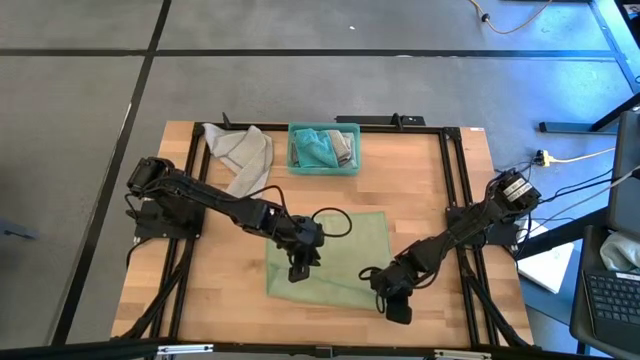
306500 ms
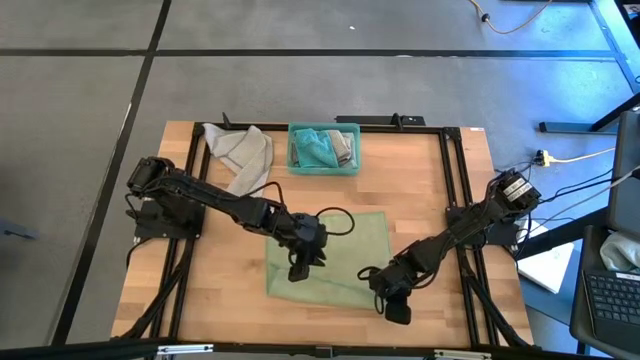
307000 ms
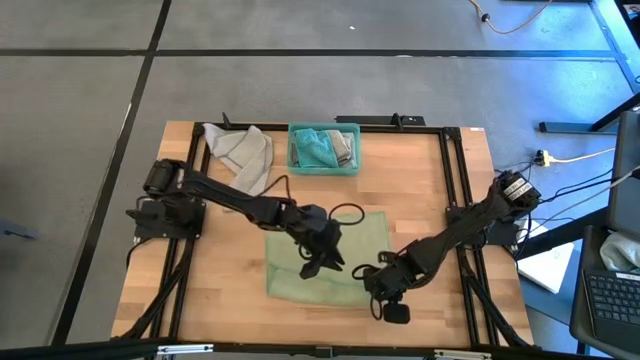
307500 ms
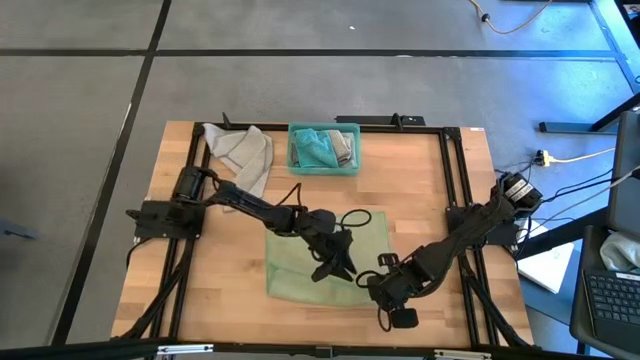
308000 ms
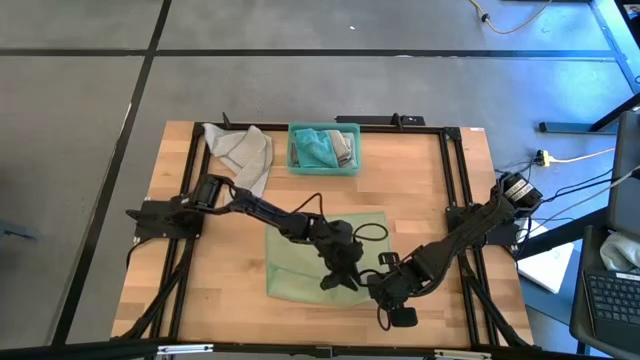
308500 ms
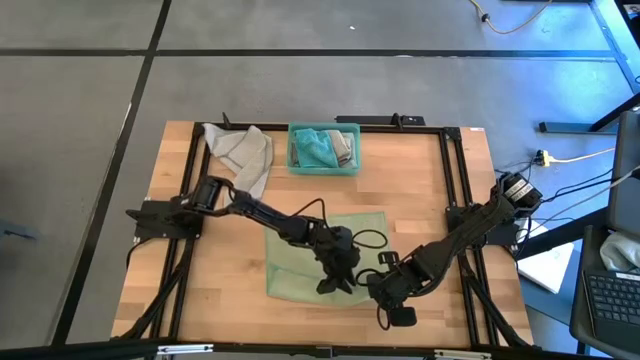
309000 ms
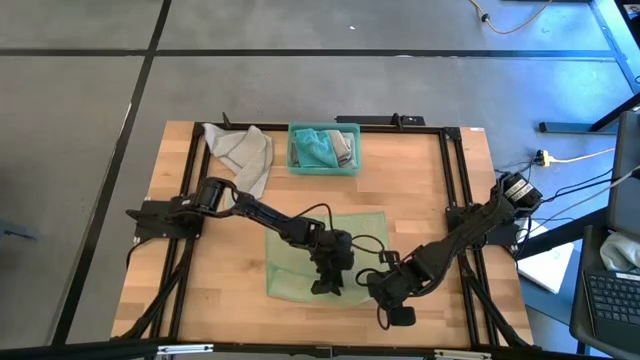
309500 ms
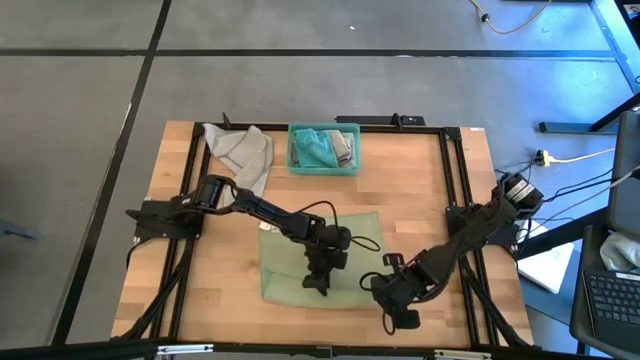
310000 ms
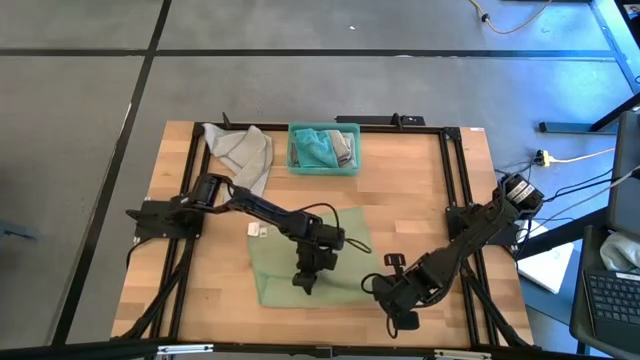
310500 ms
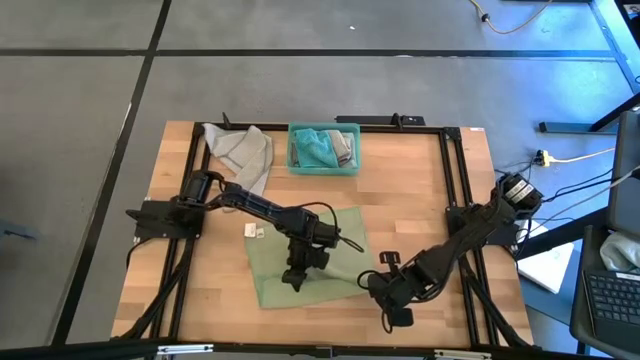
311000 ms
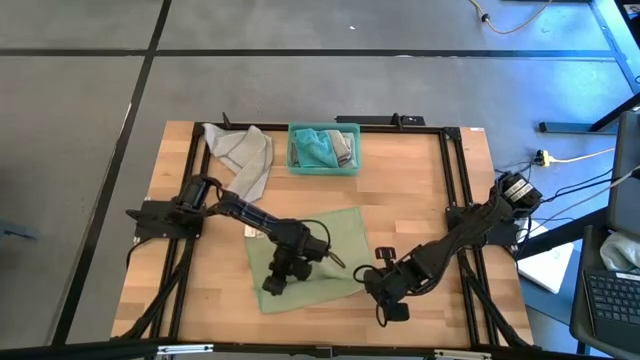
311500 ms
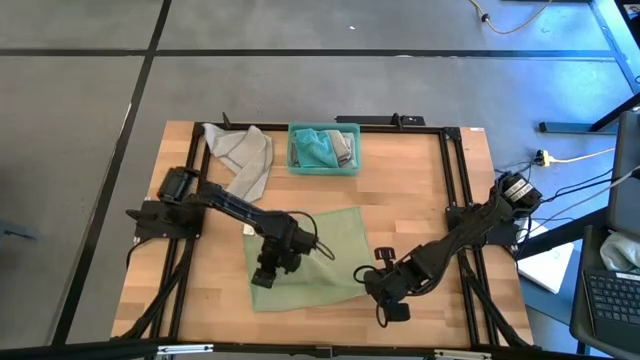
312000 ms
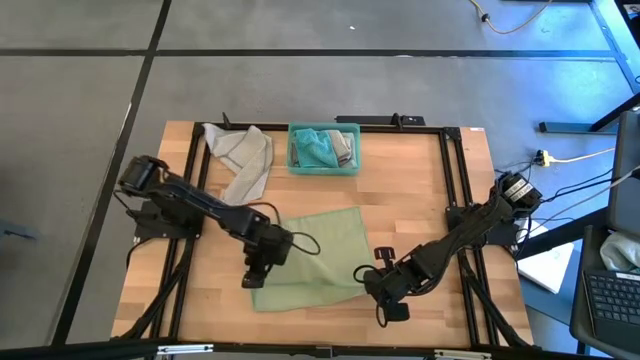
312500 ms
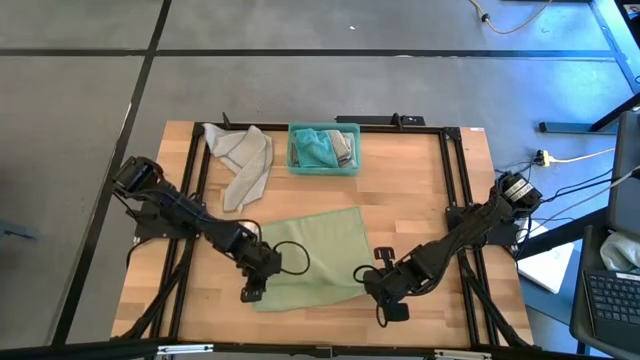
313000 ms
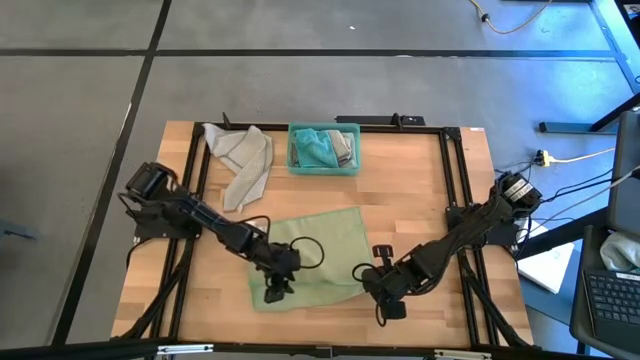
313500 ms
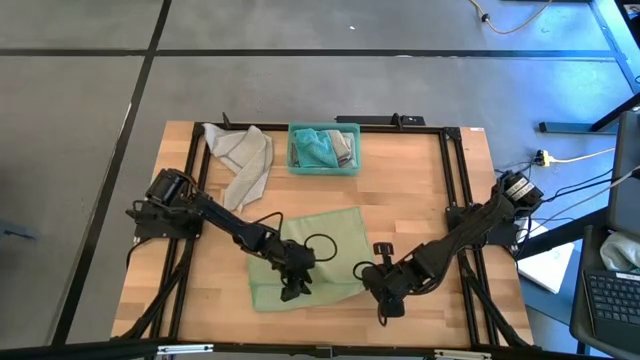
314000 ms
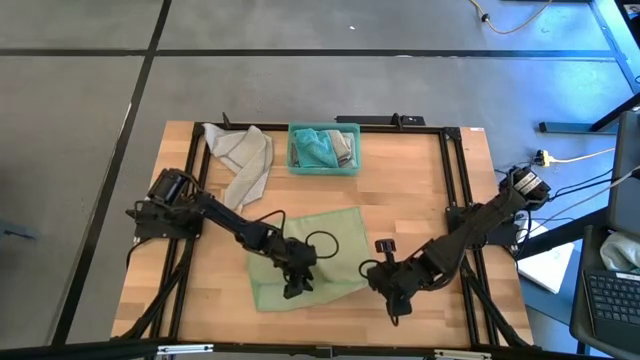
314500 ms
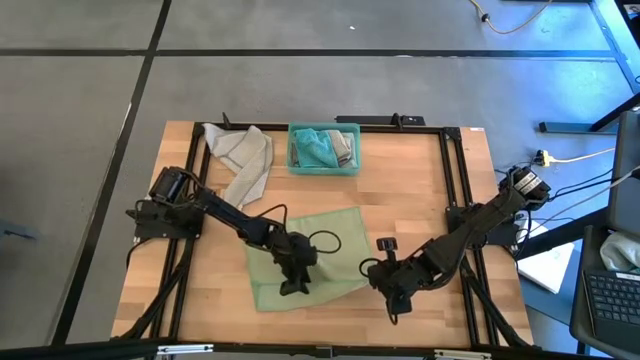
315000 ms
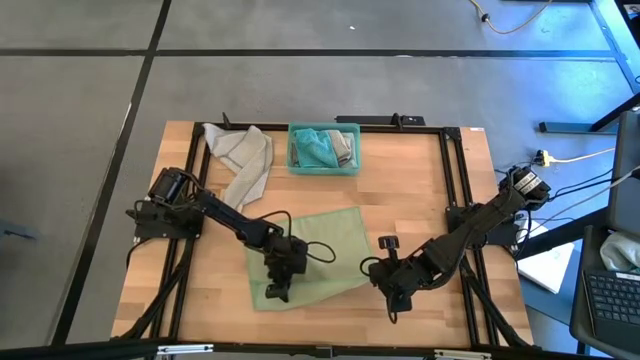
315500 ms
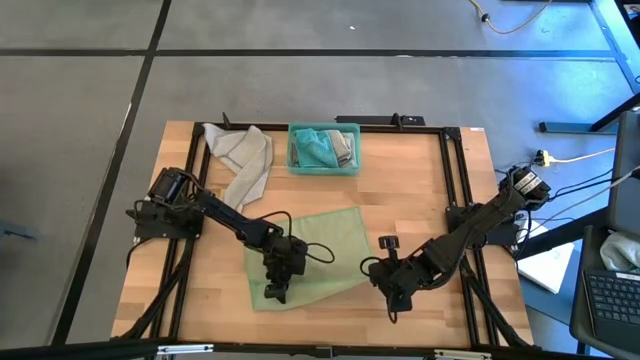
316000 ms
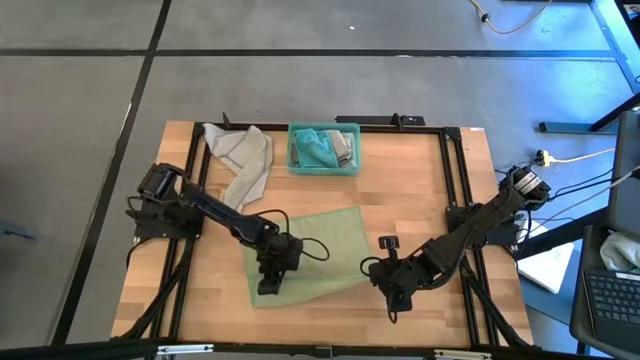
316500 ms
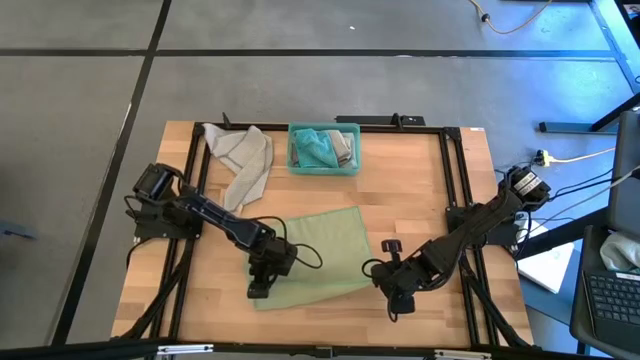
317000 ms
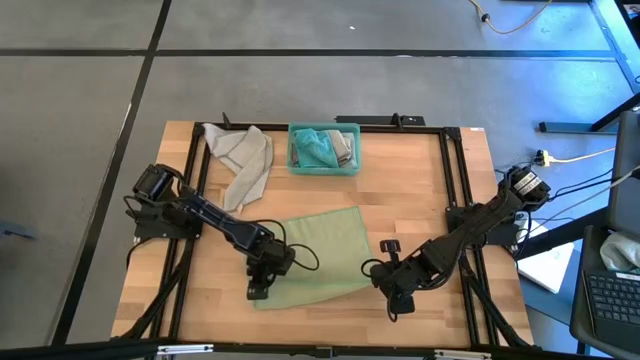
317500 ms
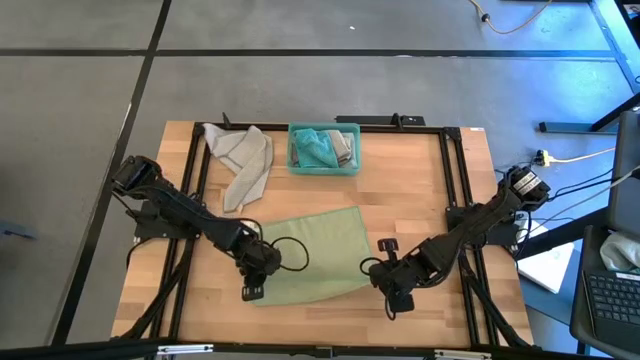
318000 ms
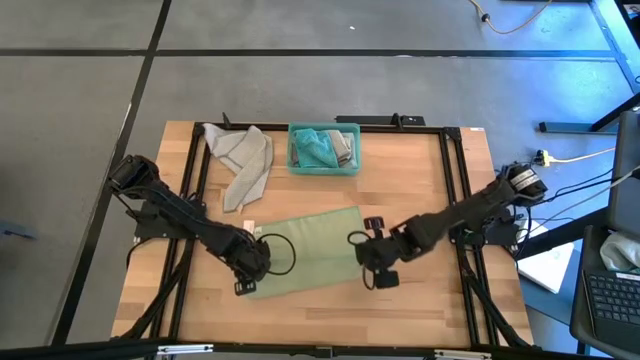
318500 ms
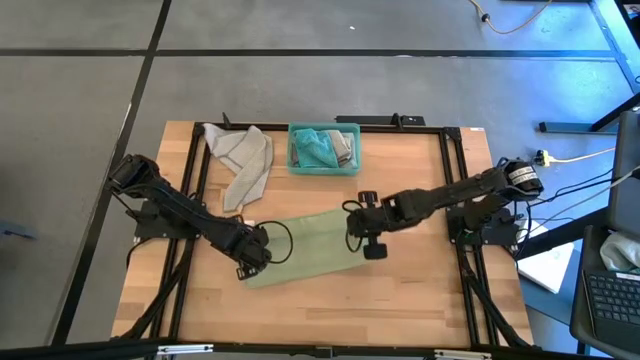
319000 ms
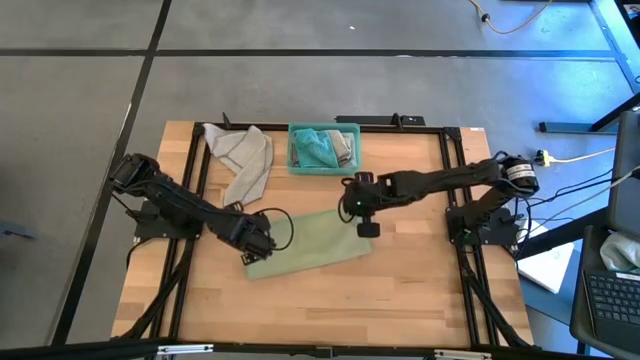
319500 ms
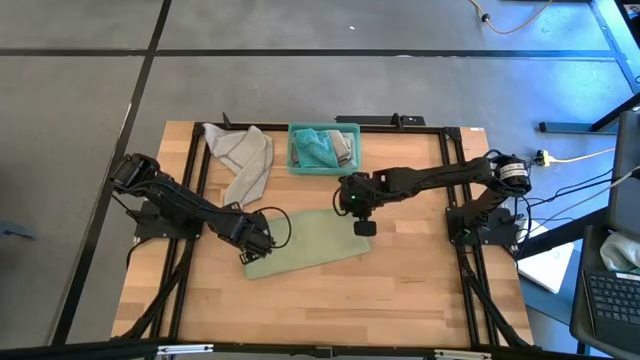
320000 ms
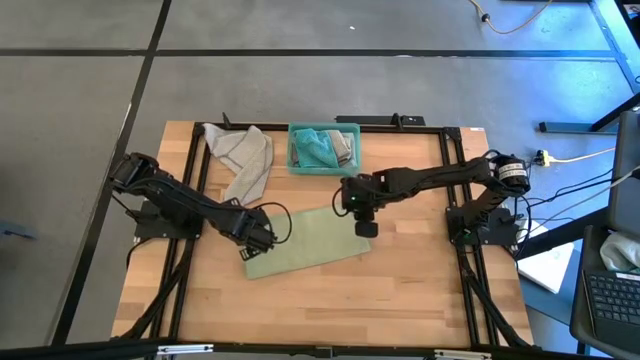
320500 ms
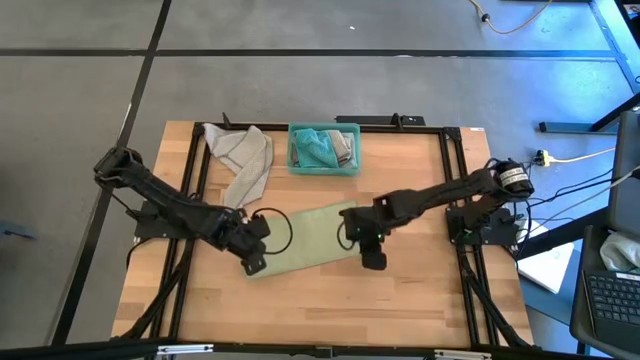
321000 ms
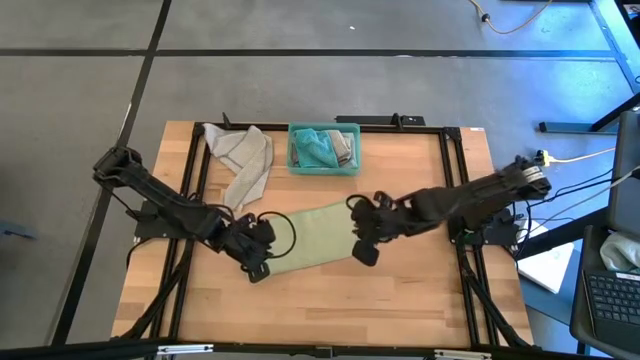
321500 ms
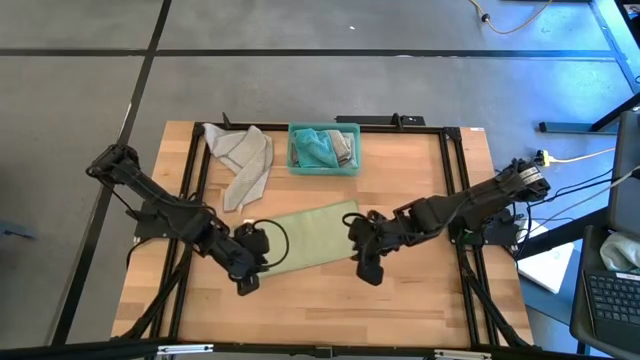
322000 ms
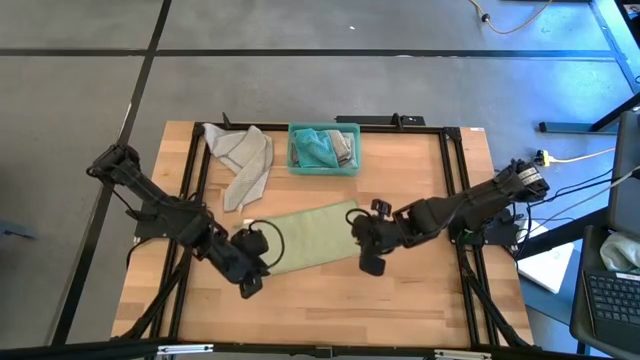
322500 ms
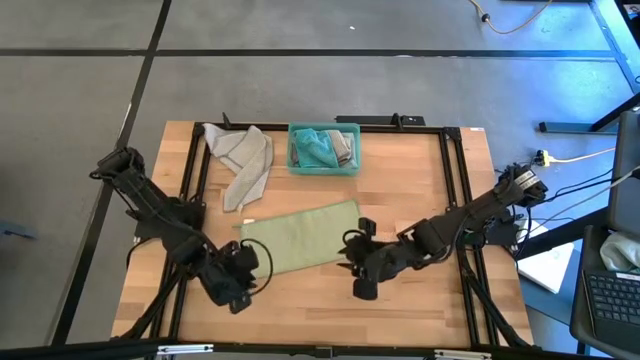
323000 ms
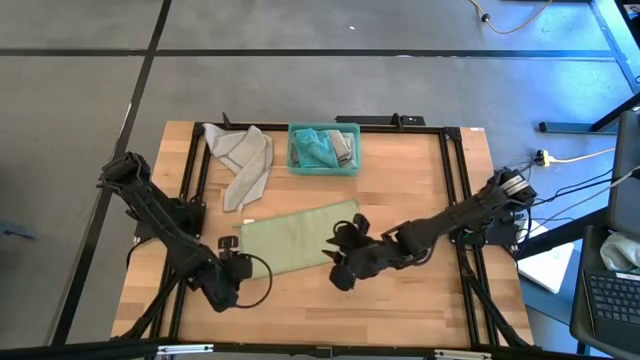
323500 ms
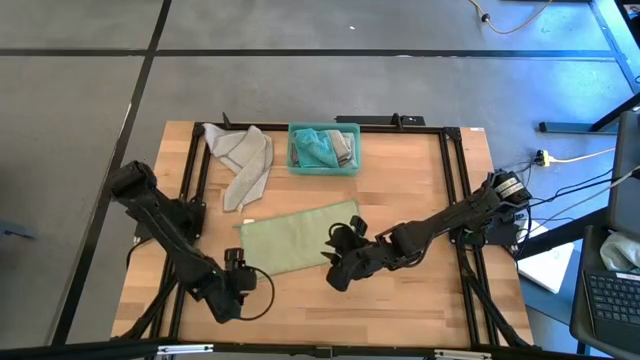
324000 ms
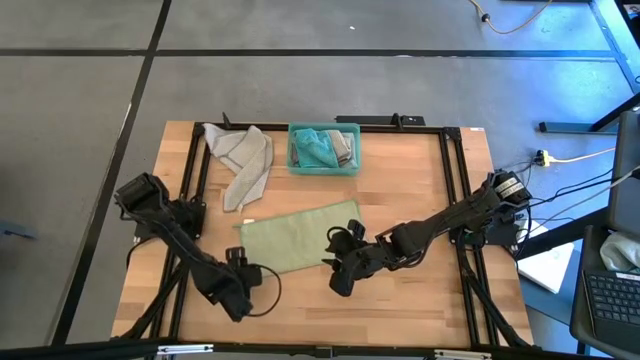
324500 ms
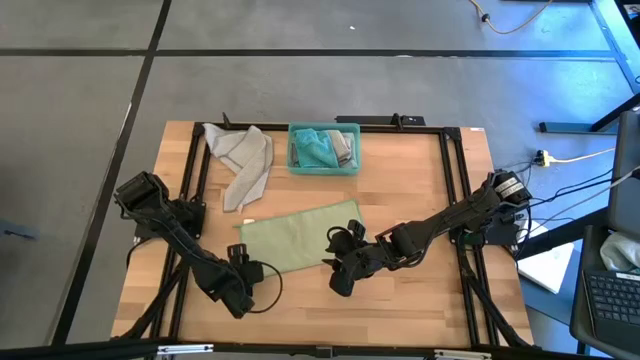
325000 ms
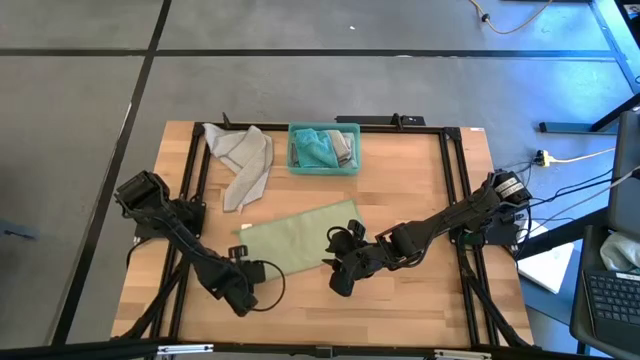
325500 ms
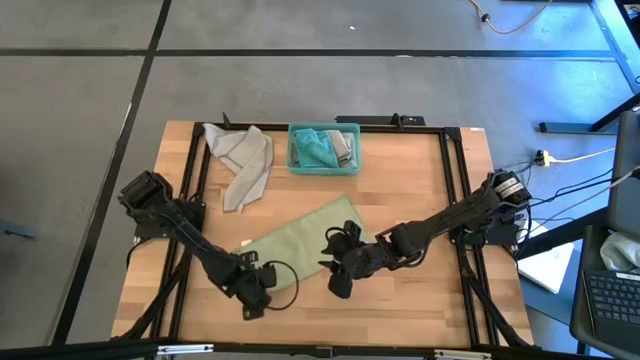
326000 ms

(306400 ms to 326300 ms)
Task: Fold microfiber towels
Fold the green towel
